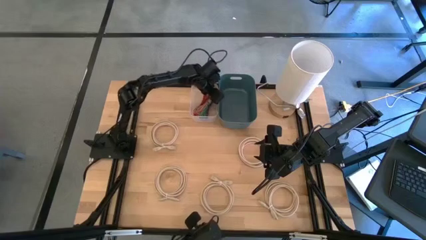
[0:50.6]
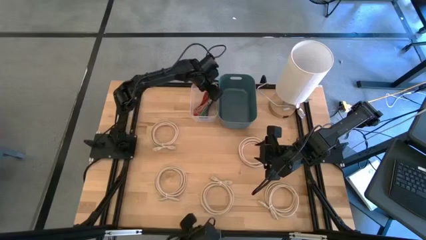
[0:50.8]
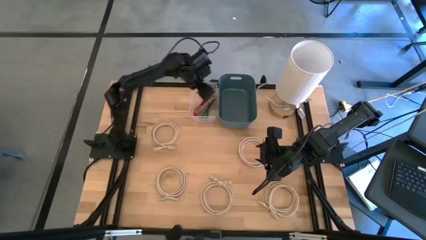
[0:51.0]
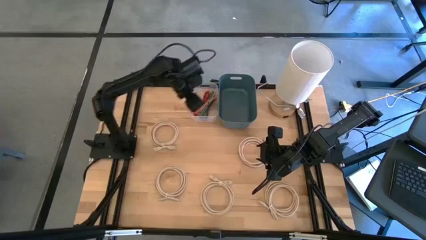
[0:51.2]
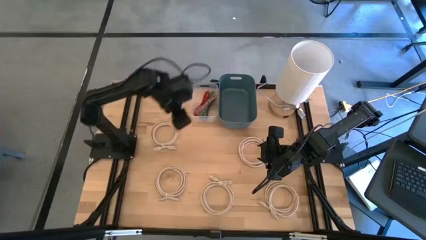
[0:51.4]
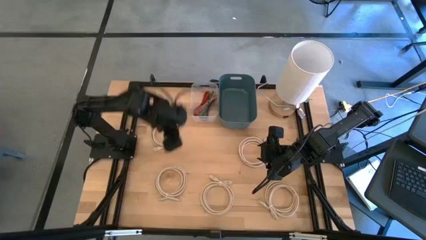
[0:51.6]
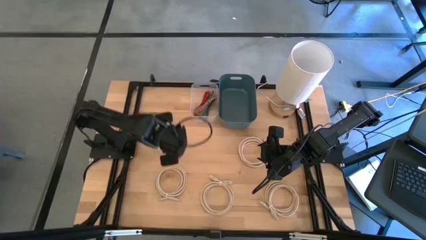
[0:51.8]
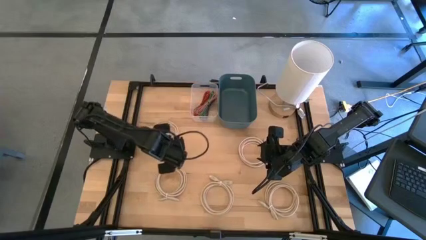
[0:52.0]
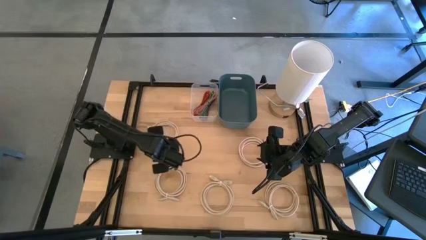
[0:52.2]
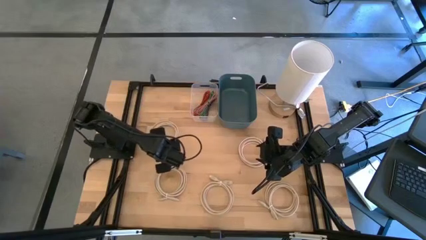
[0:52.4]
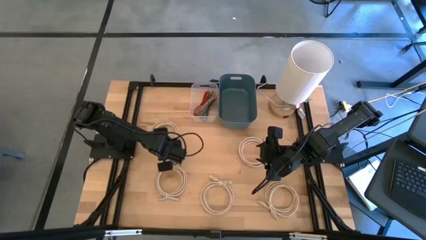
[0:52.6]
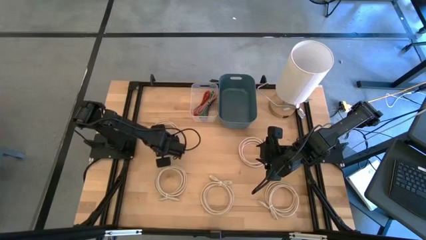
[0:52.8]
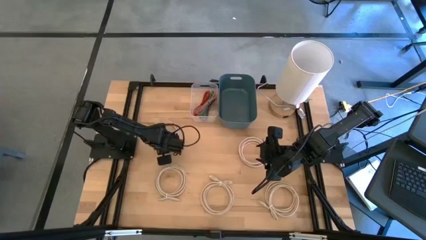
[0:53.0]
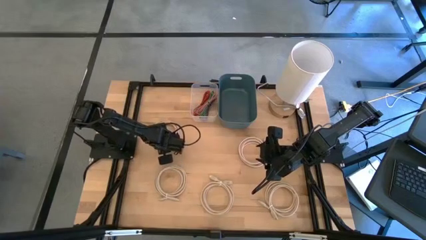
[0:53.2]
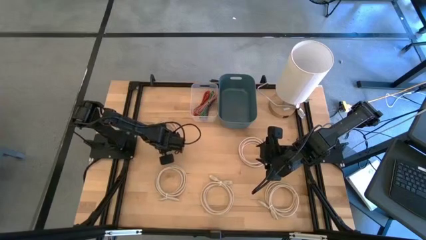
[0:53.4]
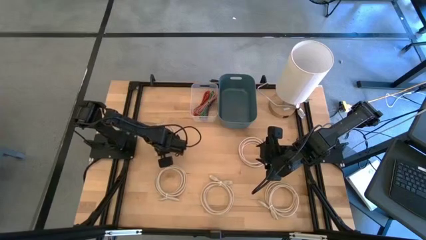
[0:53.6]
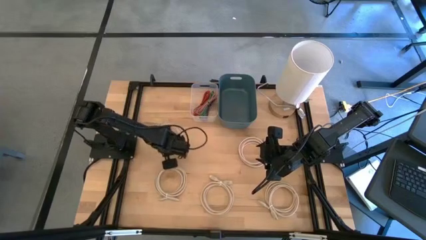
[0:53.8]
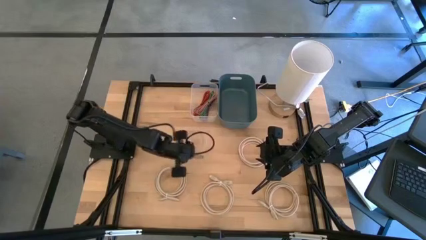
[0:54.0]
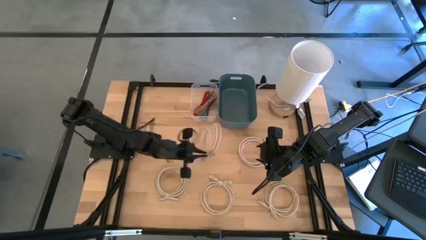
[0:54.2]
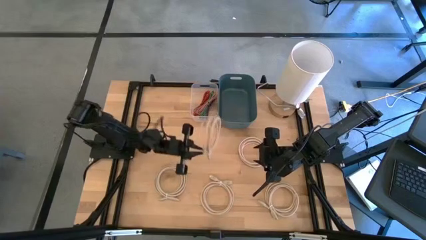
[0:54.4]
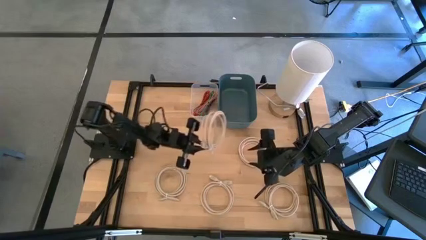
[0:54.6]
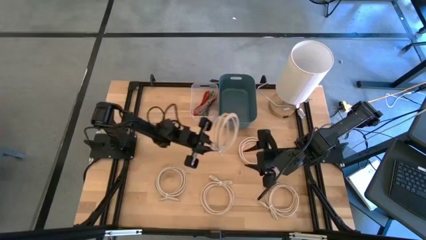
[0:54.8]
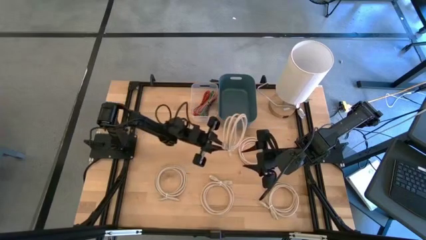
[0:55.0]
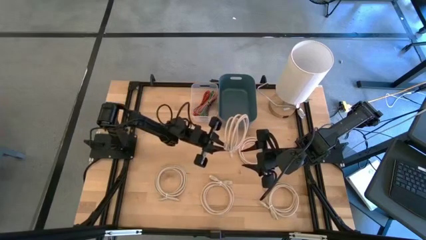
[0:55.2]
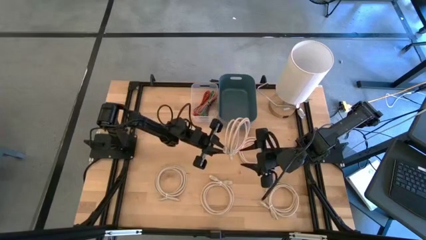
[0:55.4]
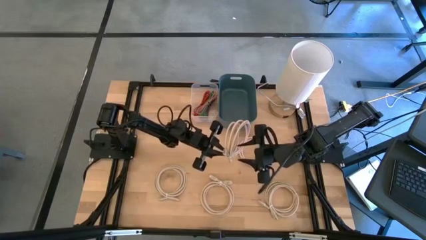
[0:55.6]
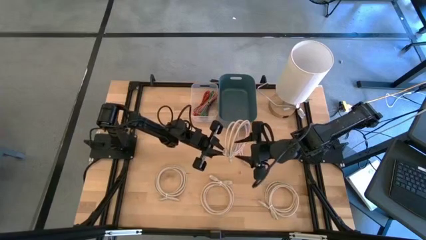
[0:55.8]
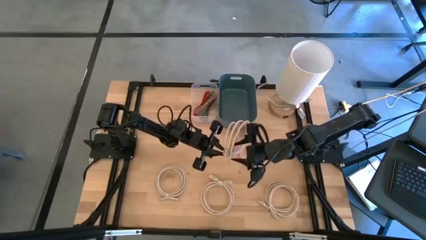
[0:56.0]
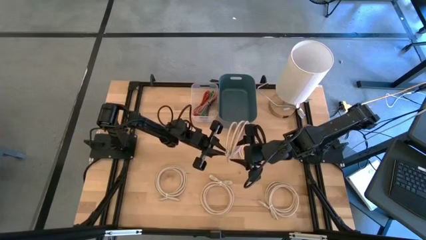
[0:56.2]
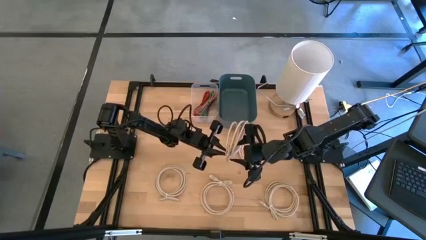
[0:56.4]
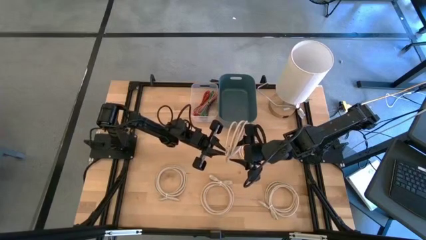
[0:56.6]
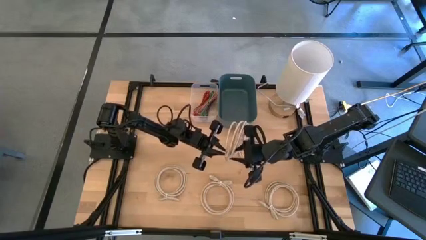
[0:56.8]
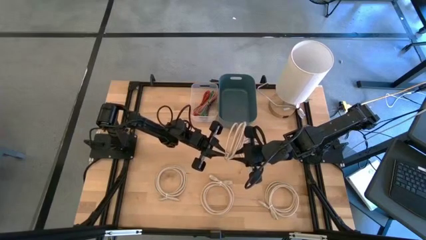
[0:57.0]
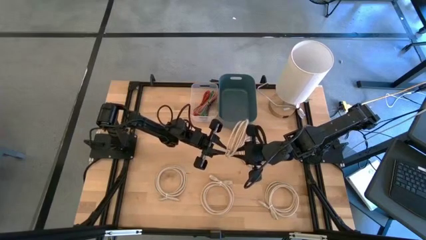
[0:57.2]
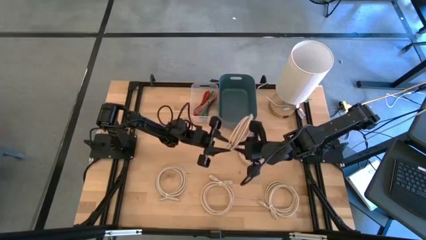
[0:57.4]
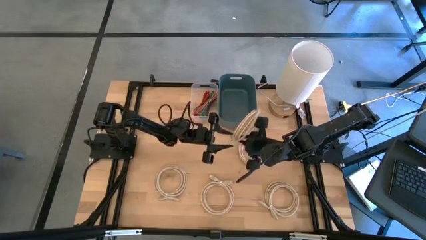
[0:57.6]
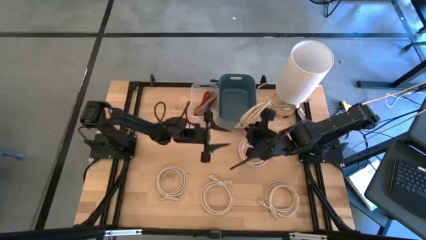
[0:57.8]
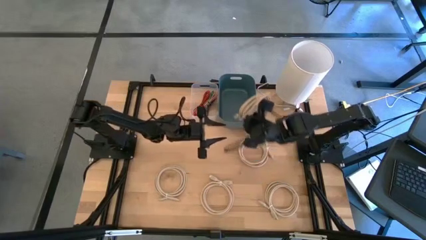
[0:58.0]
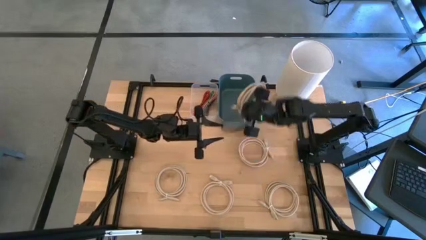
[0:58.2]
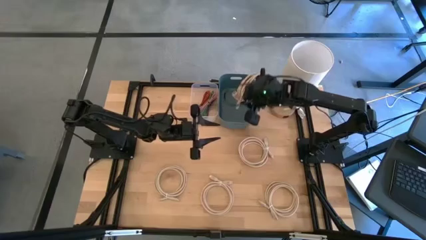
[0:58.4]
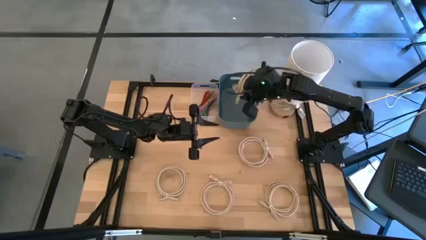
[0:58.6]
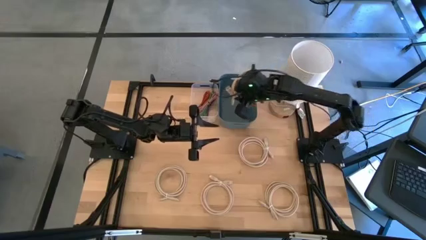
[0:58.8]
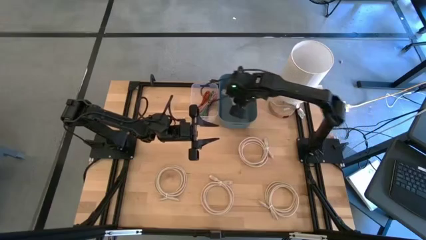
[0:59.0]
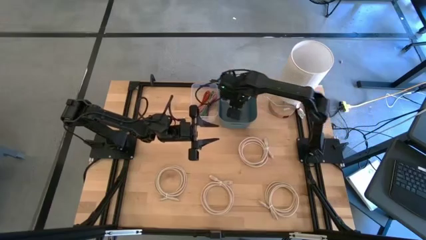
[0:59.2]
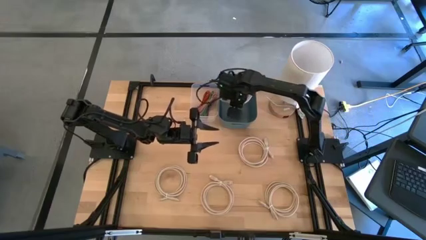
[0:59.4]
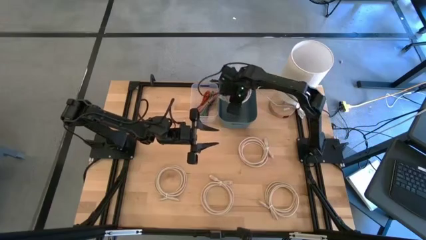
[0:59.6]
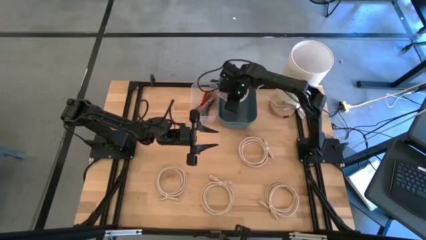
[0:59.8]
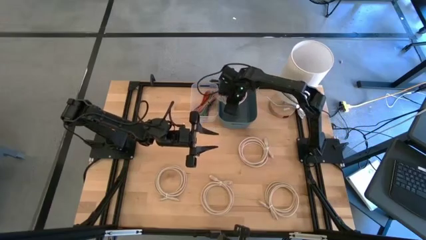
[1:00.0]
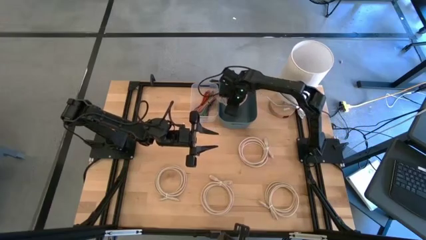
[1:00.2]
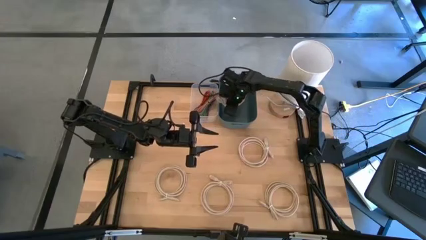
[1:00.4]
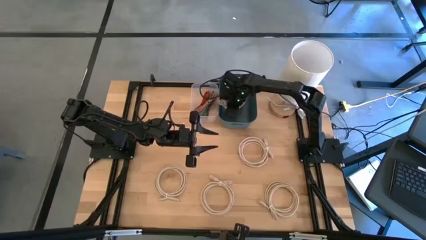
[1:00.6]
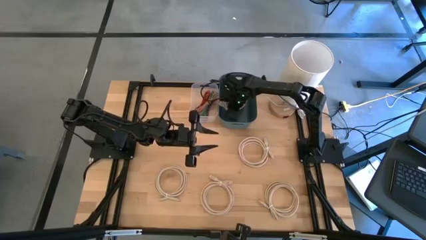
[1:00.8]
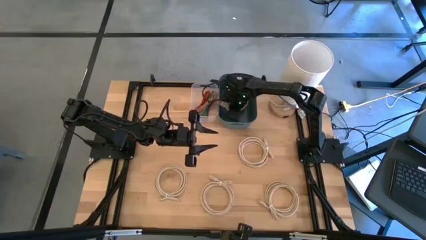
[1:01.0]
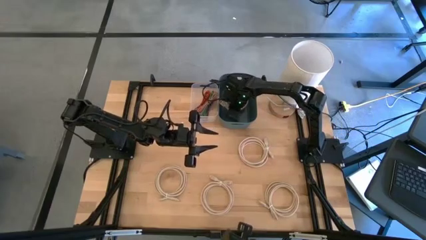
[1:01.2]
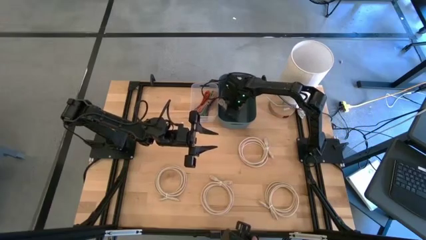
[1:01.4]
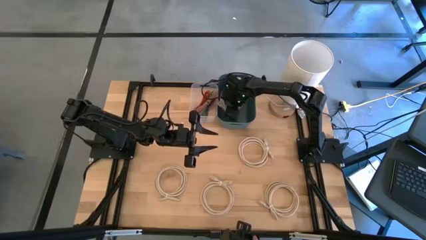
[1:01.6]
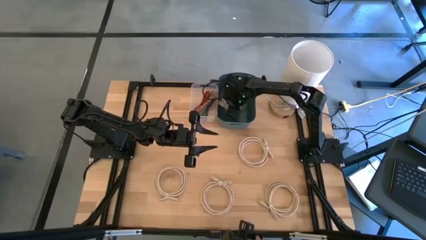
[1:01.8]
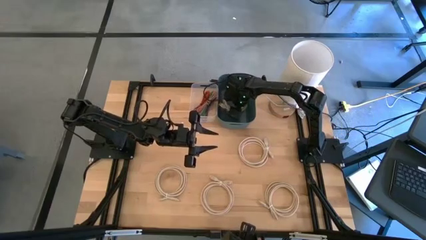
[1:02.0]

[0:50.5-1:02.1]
Task: Pick and place USB-C Cables
Put the white HDMI cable into the blue bin

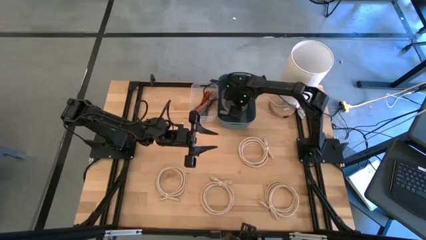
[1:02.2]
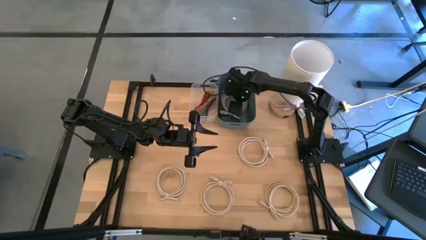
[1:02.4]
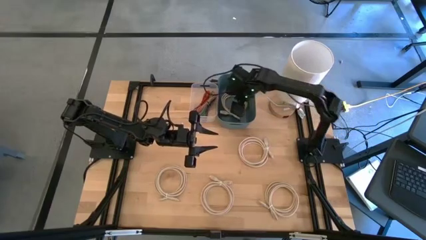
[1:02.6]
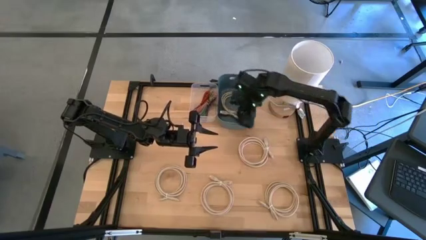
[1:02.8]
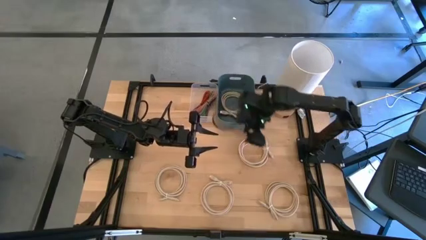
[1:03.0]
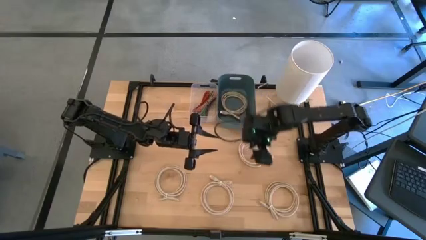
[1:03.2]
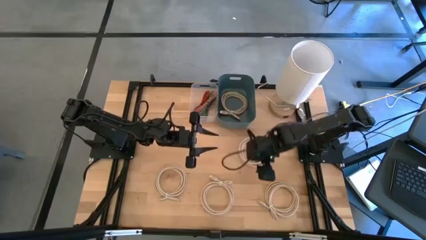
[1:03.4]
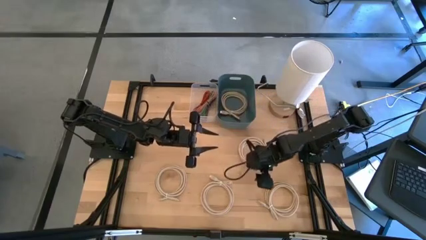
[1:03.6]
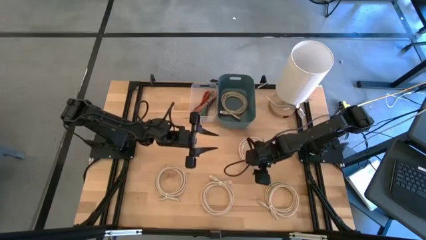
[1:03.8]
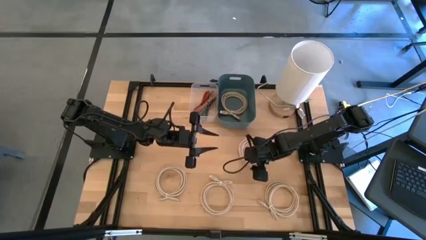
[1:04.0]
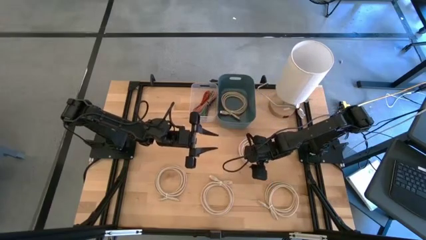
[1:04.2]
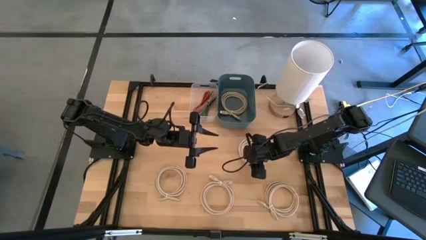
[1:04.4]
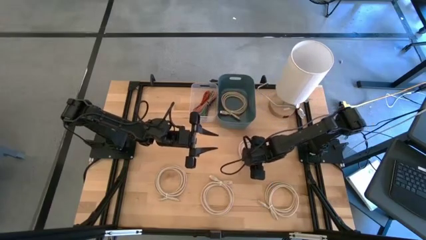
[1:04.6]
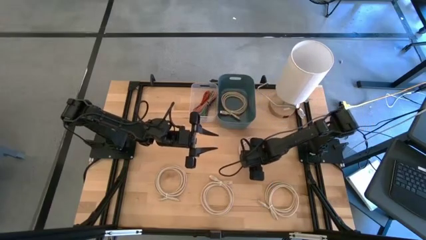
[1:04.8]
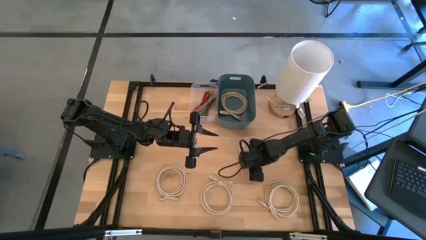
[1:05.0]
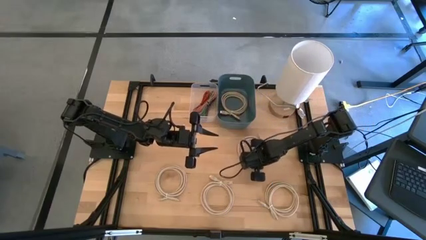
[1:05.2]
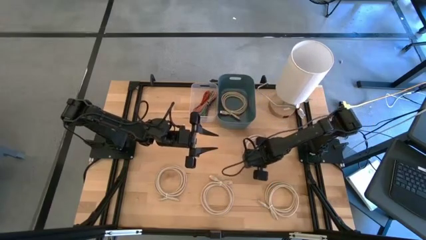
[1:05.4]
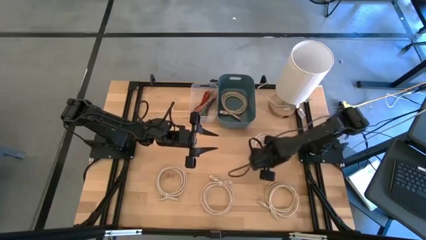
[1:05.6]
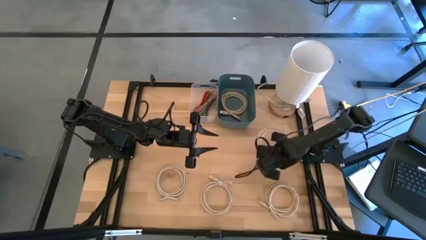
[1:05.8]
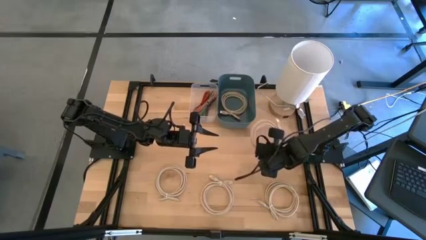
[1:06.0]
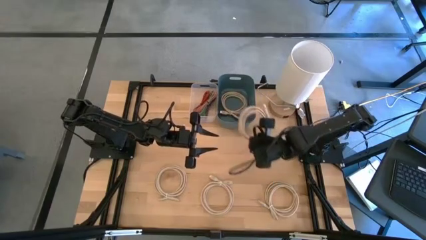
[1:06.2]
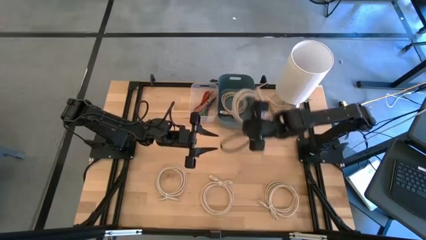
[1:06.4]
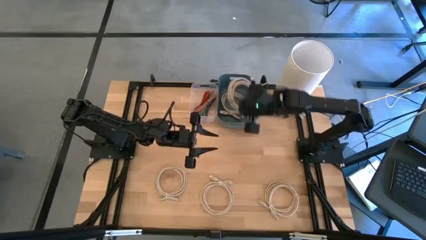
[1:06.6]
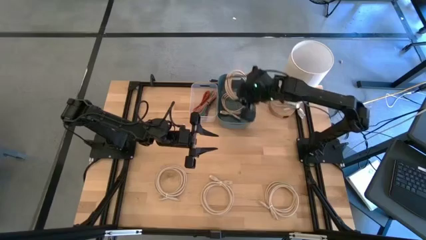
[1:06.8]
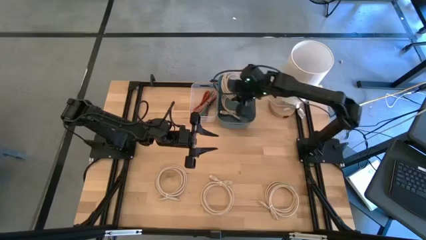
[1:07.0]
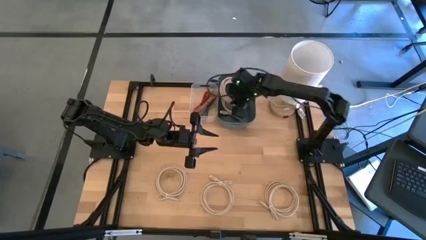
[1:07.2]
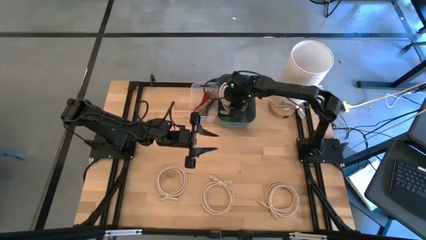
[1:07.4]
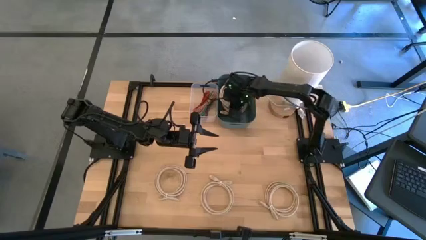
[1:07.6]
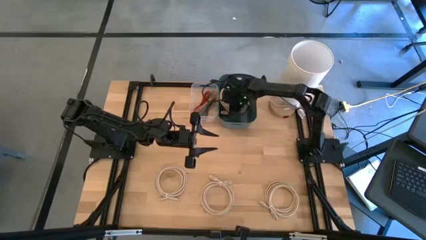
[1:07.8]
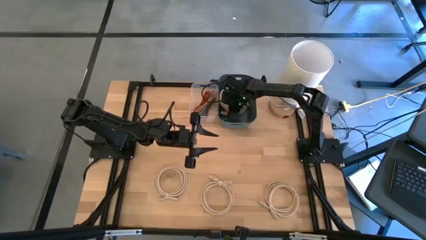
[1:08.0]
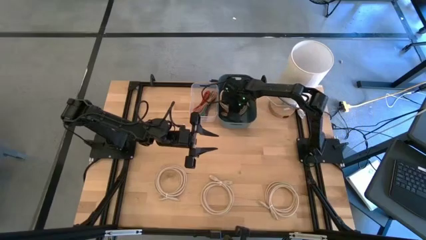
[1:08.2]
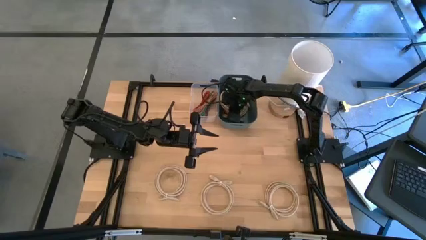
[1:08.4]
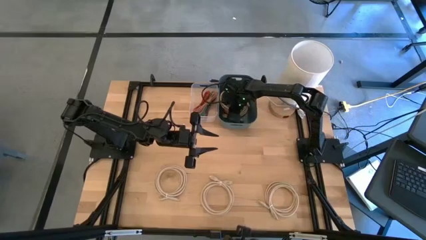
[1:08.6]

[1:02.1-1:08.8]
Put the white HDMI cable into the blue bin
